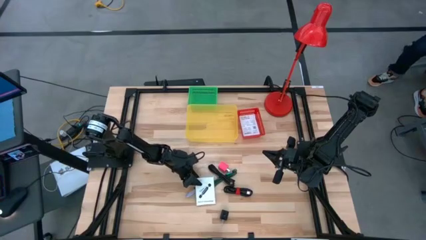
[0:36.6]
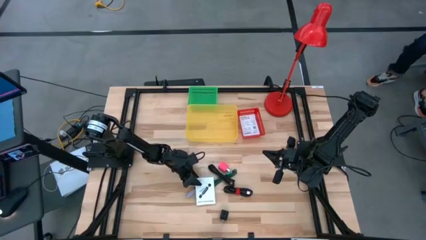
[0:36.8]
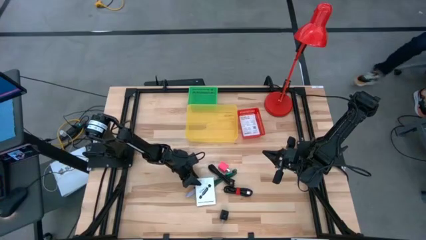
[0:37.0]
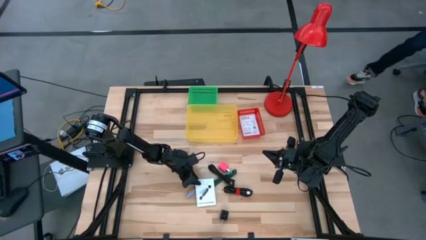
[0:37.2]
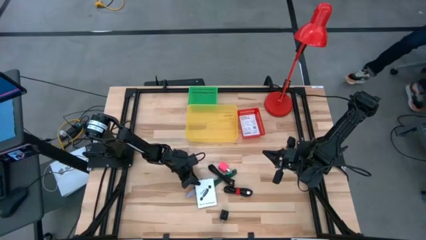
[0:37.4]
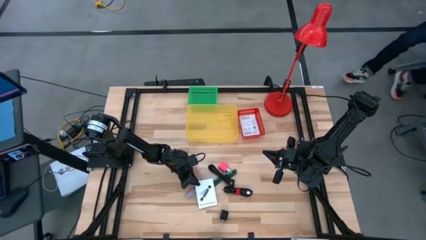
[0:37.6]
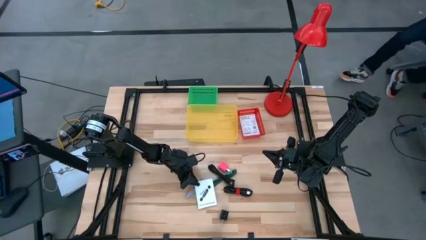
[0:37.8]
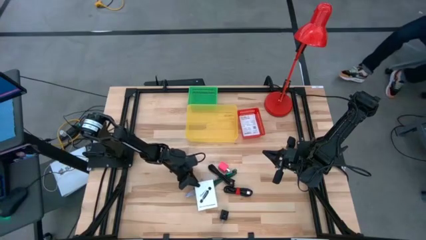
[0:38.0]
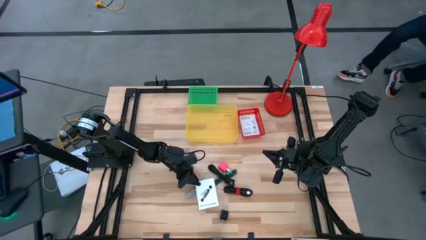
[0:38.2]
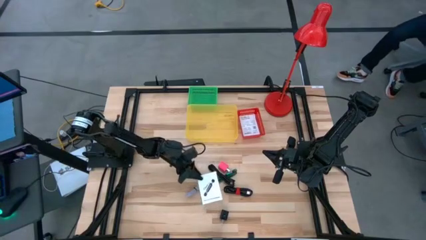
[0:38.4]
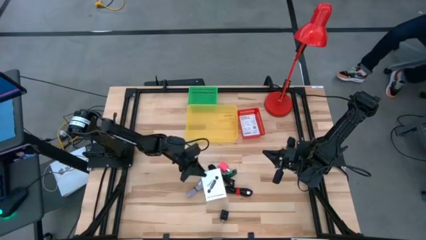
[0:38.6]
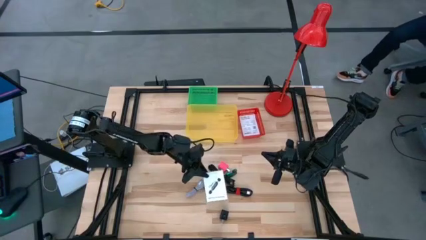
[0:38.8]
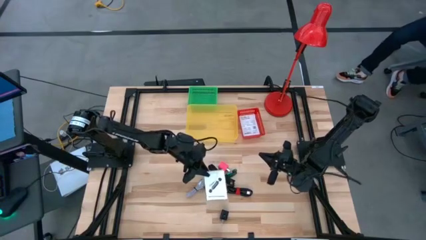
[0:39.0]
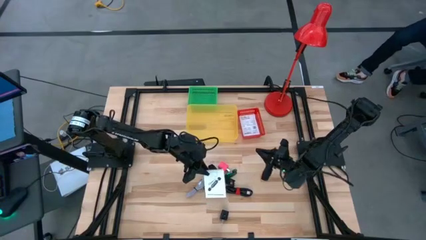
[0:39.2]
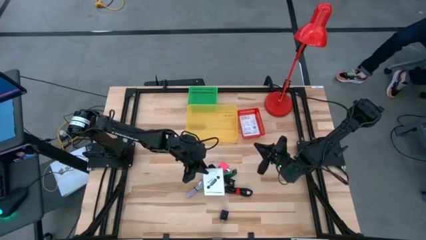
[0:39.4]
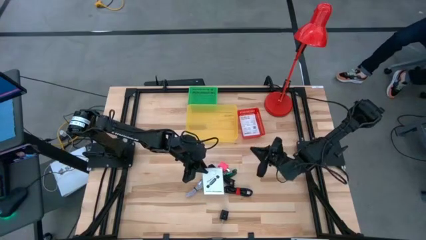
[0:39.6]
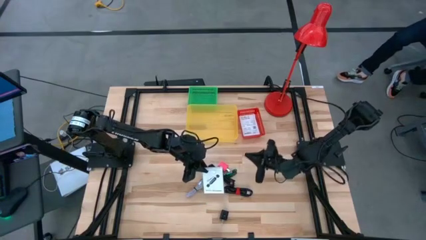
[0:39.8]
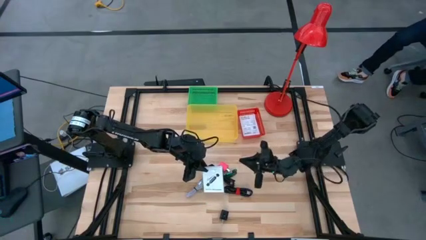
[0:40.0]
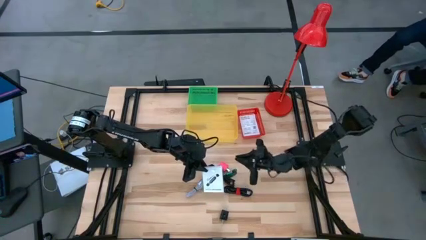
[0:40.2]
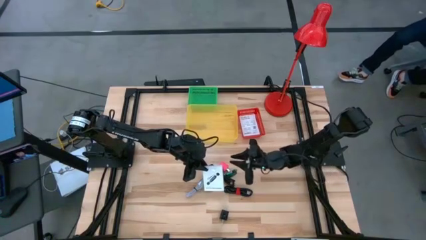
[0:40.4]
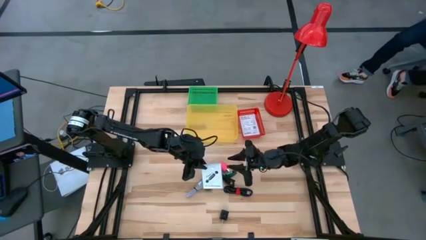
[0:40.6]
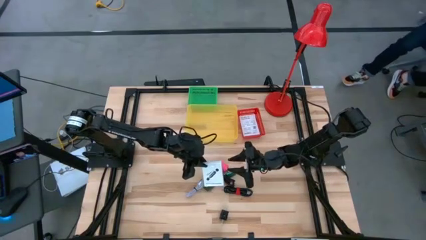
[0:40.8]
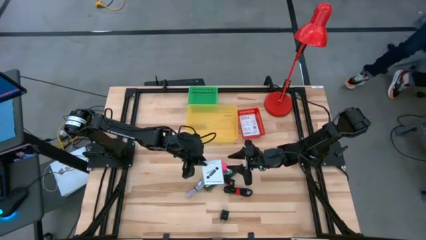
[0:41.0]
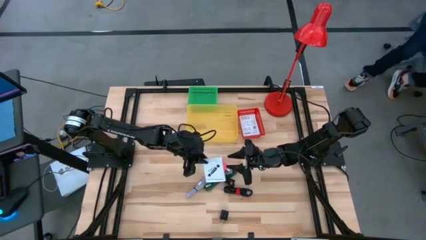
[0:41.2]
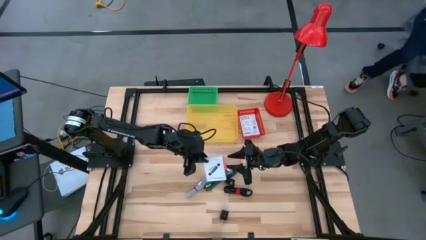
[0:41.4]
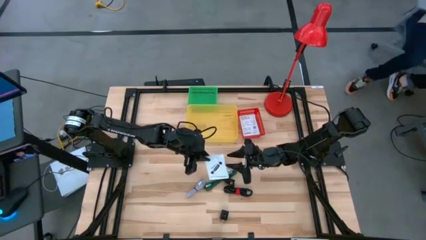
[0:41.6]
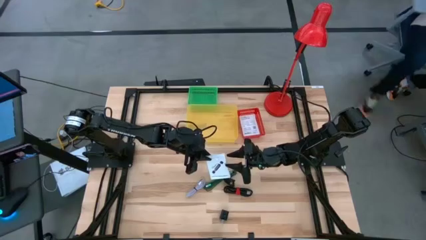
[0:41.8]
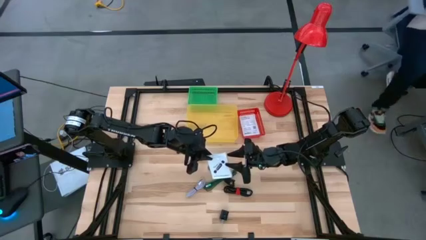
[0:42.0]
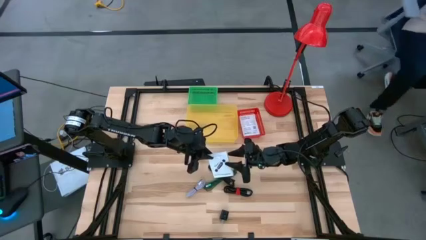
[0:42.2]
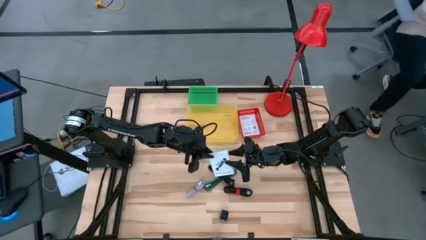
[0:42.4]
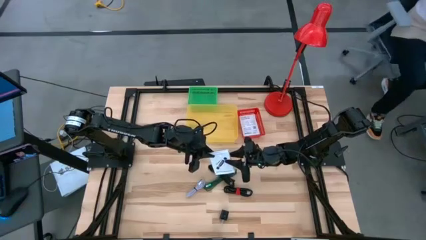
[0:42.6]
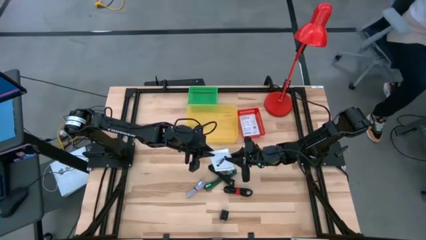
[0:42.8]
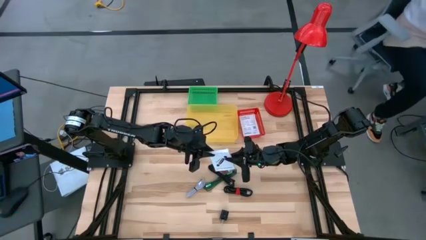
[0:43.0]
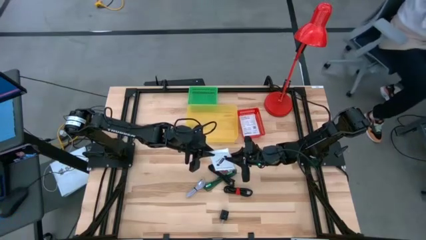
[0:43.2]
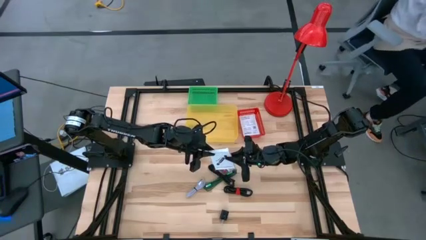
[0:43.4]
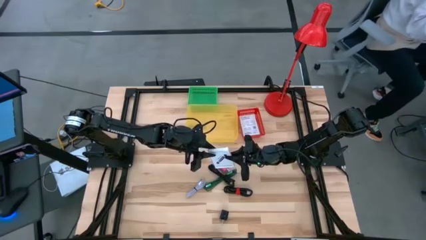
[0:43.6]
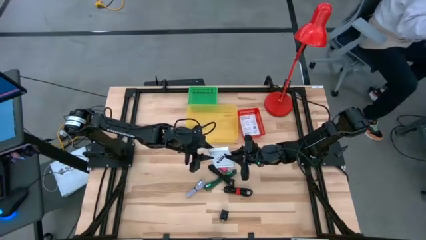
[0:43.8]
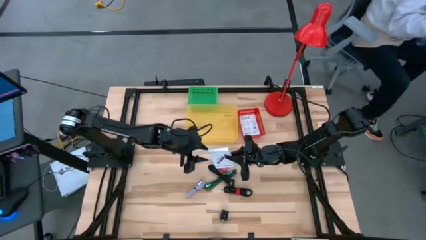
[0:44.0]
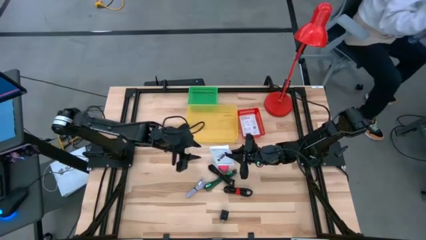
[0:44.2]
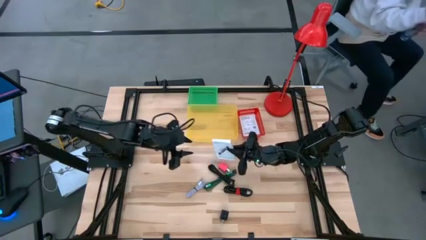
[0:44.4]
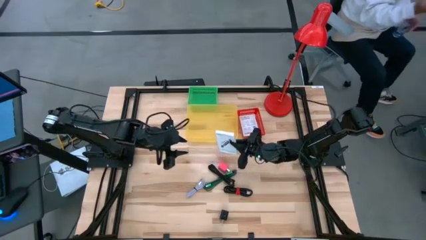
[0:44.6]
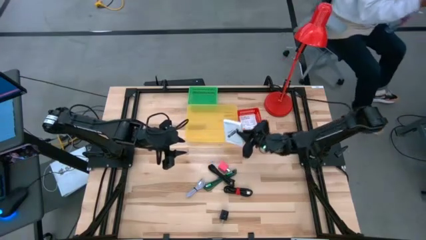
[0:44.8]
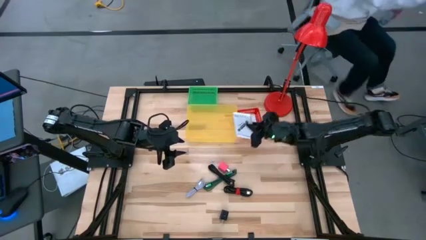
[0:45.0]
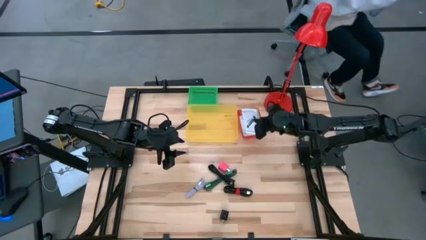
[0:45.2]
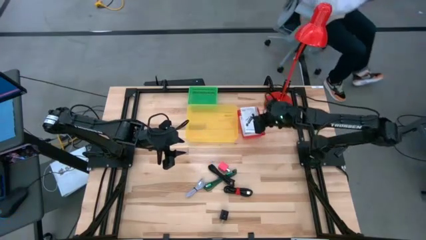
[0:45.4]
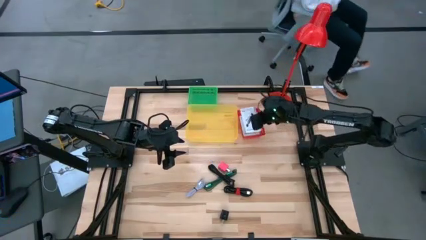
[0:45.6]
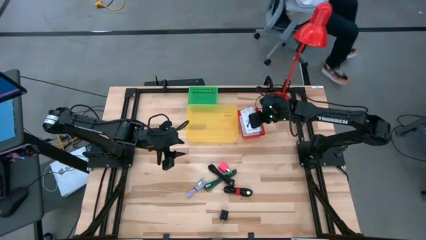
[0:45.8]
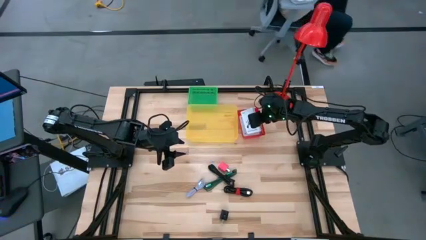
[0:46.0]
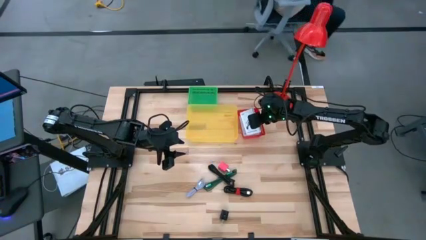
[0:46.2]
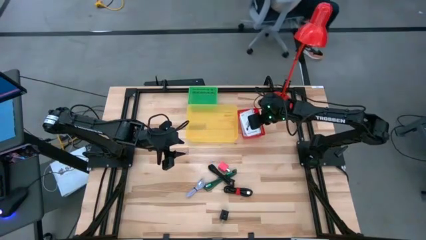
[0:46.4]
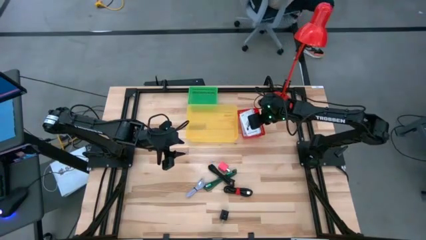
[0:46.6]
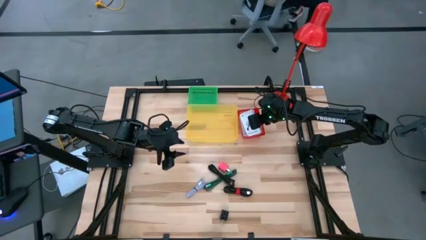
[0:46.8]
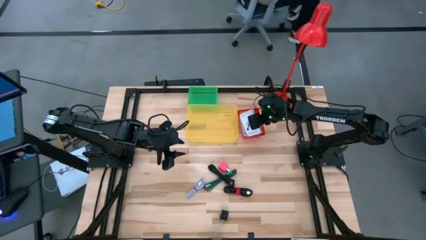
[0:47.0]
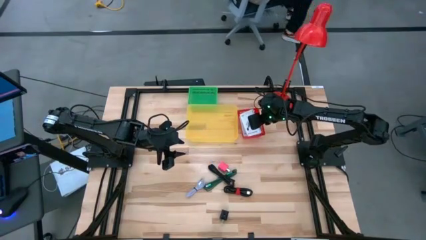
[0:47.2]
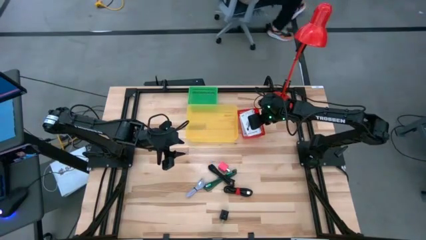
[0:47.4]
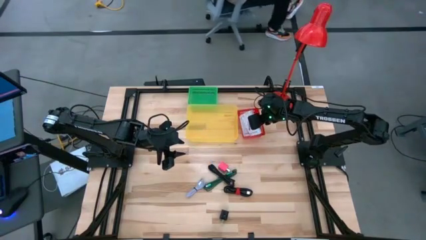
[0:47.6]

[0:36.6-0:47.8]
Task: Pick and place items into bin
Put the white card reader box into the red bin

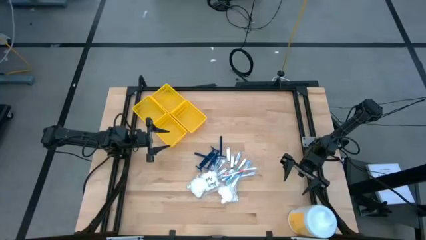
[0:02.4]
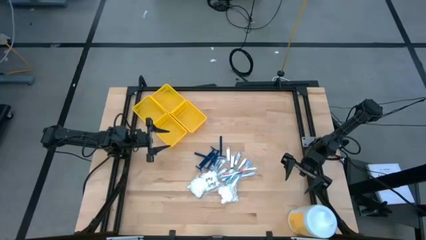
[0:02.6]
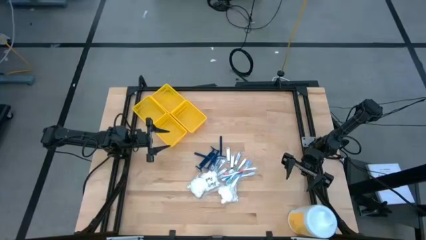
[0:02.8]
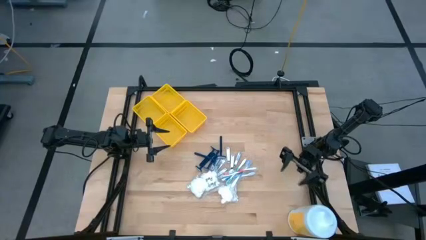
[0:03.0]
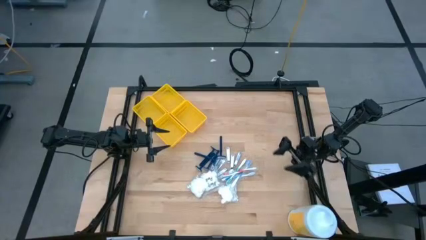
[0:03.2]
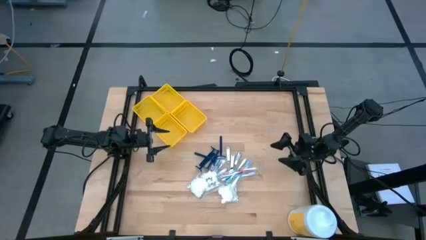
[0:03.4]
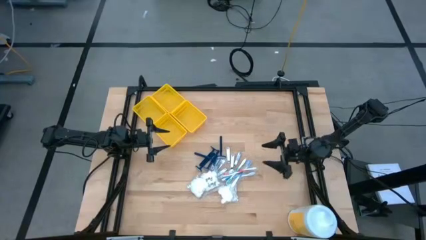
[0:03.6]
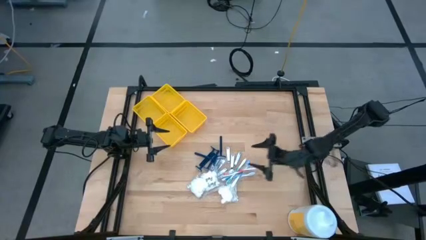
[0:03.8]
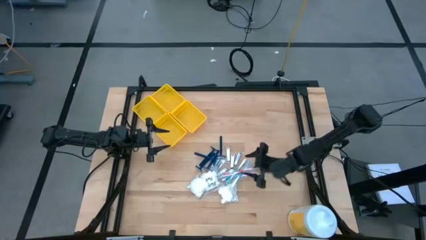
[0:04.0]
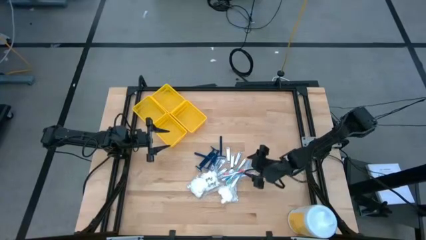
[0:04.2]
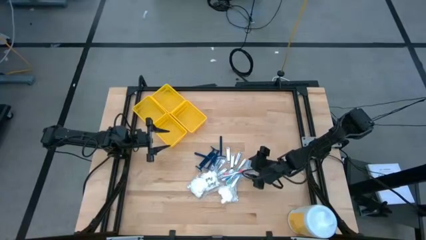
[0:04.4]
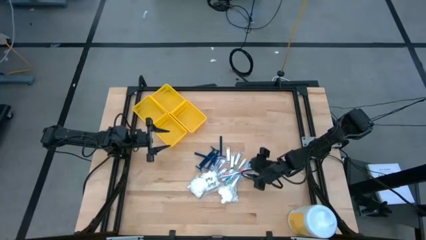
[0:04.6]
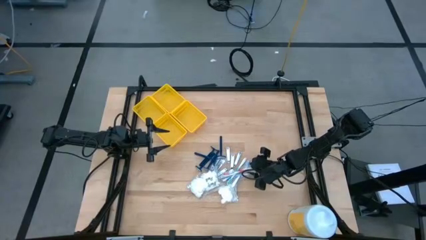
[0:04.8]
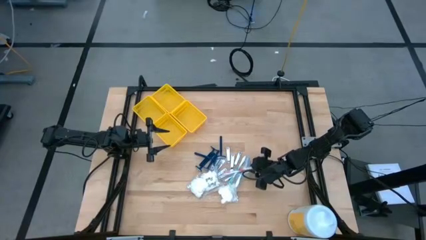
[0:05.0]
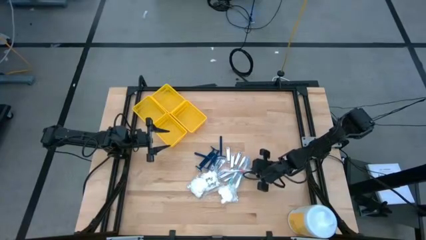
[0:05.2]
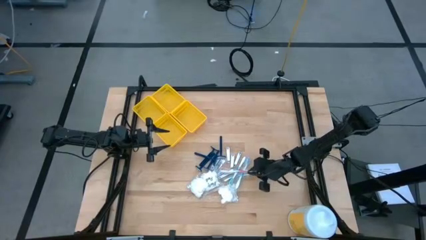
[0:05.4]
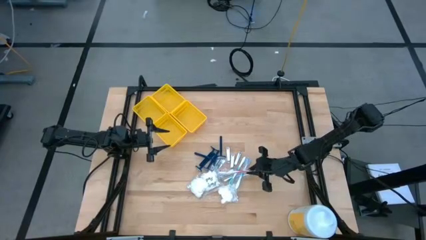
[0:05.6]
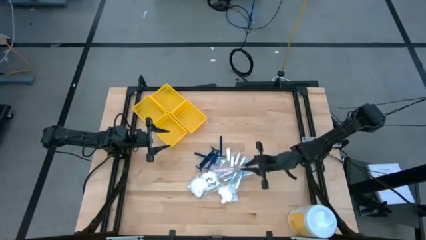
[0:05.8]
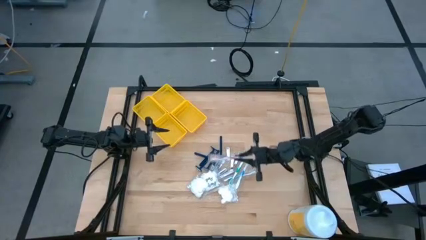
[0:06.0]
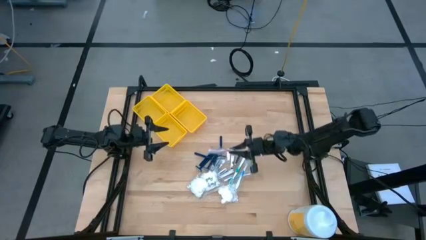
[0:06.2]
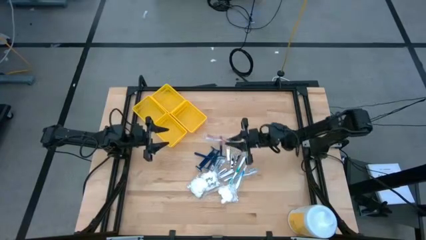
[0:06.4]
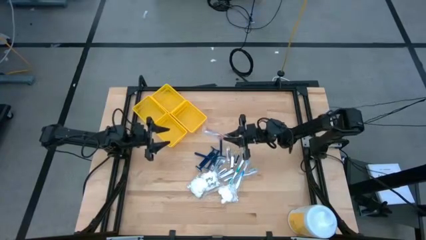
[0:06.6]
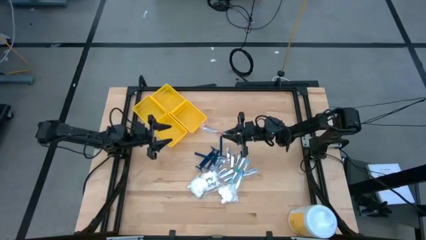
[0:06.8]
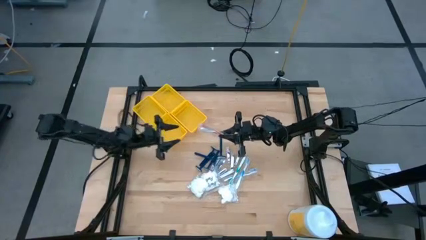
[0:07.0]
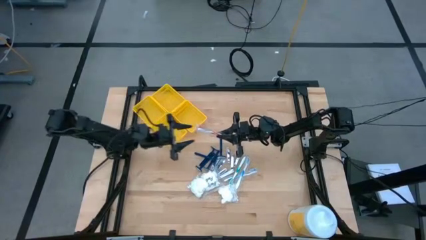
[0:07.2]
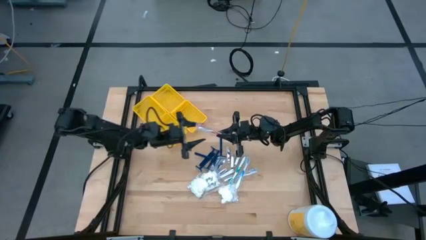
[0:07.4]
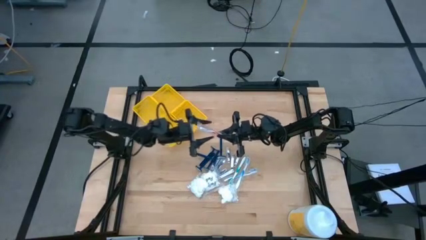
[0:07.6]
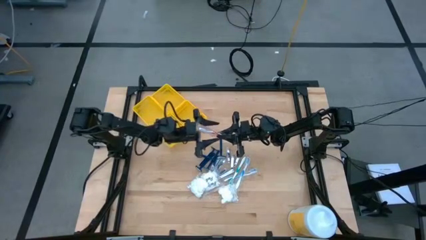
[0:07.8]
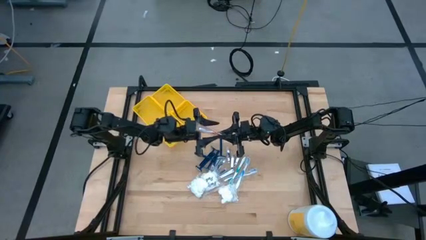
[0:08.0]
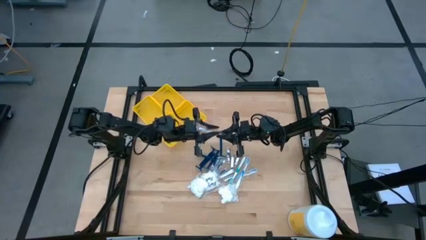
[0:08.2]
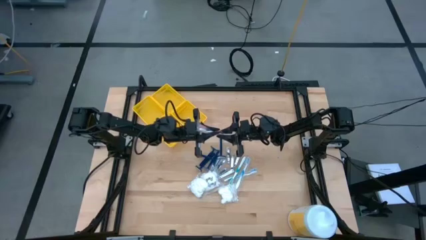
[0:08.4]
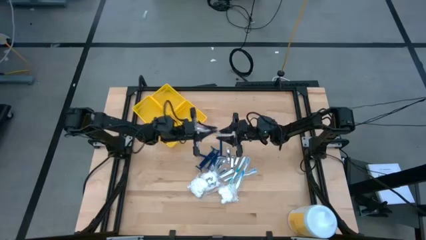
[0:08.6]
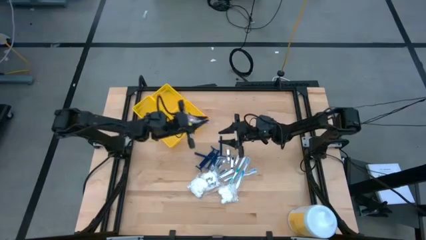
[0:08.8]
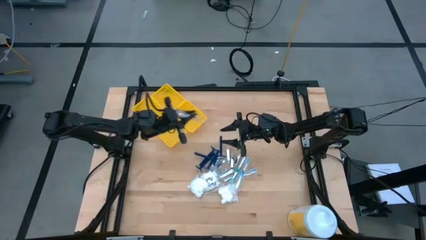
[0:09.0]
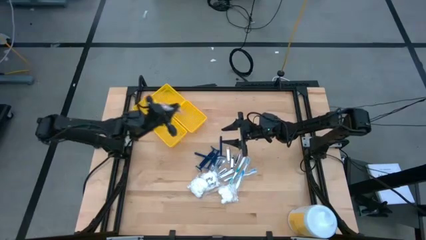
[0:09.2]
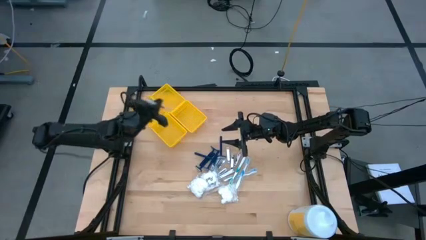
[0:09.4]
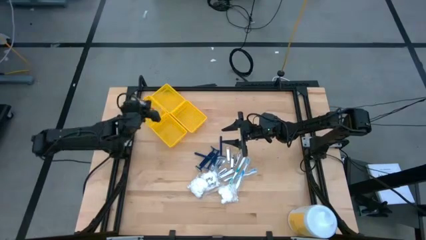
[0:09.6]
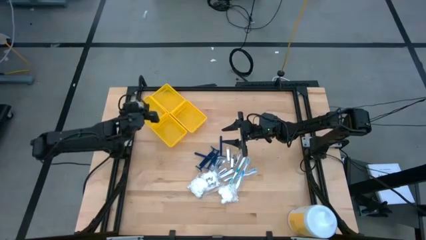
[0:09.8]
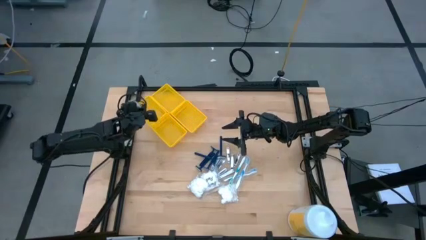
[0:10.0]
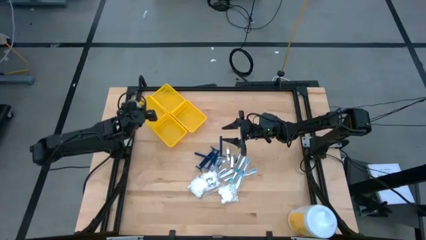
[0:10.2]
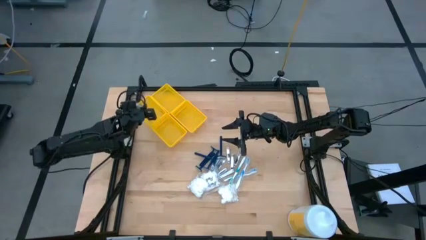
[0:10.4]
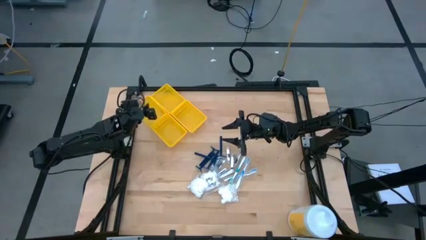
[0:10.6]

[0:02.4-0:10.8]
Task: Pick & Place Travel size toiletries
Put the red toothbrush into the middle left yellow bin
